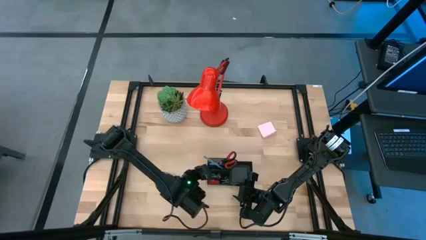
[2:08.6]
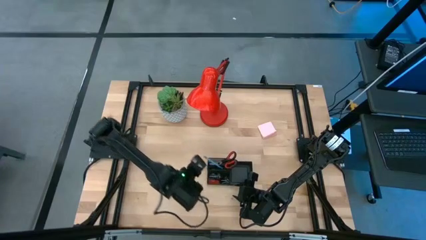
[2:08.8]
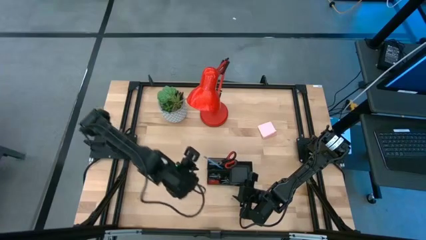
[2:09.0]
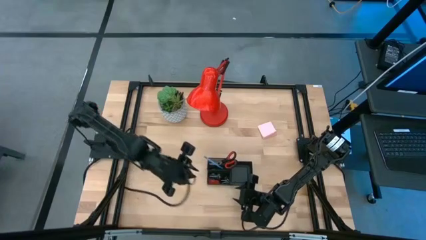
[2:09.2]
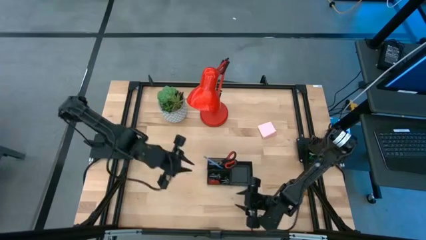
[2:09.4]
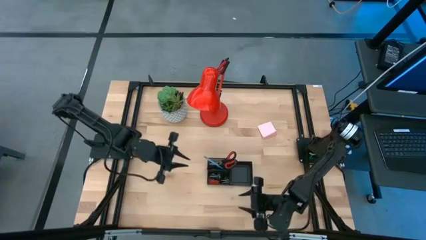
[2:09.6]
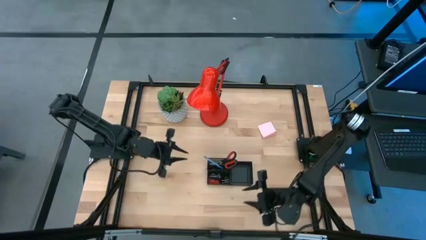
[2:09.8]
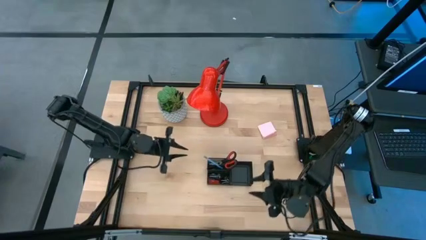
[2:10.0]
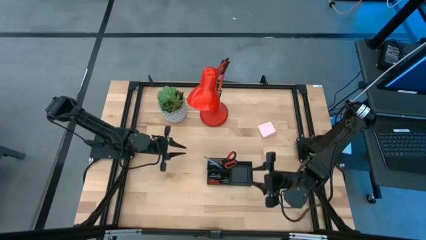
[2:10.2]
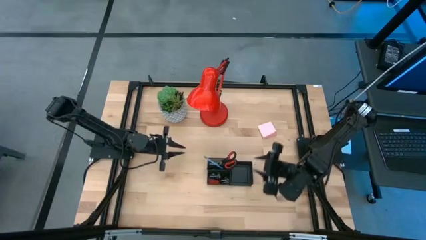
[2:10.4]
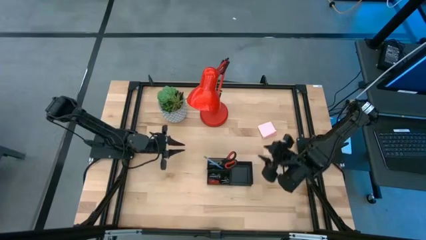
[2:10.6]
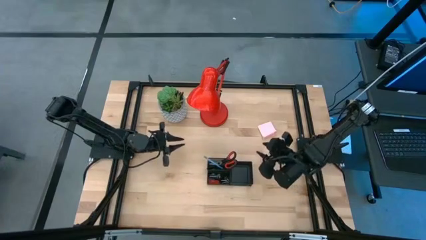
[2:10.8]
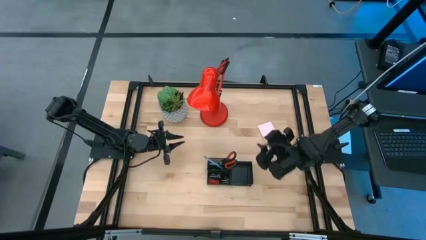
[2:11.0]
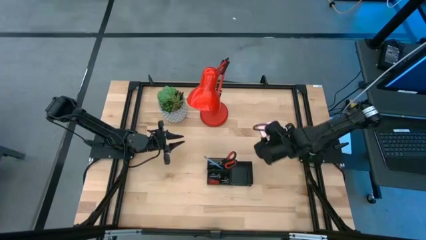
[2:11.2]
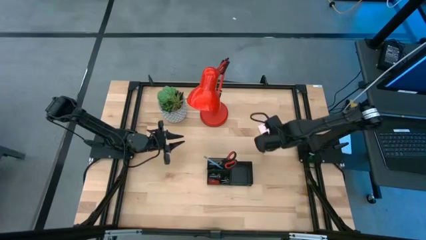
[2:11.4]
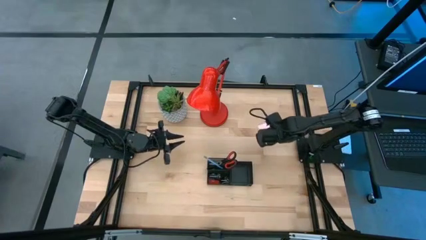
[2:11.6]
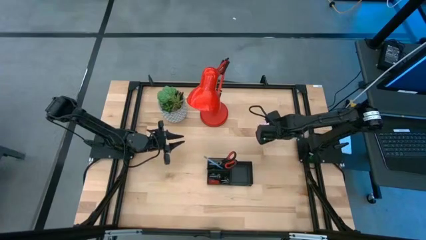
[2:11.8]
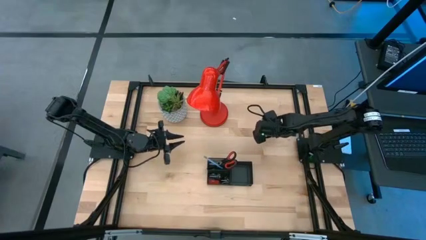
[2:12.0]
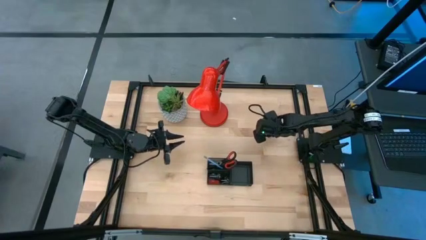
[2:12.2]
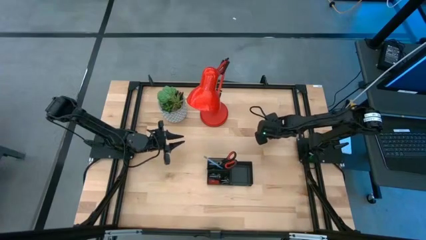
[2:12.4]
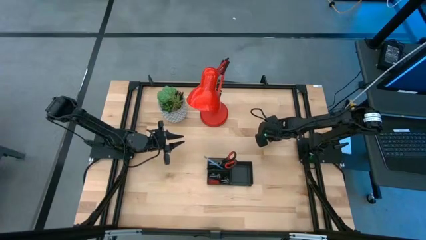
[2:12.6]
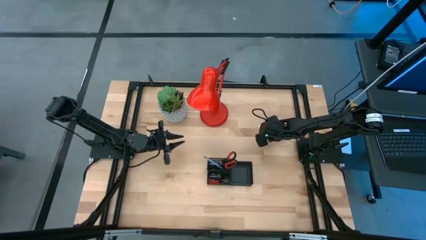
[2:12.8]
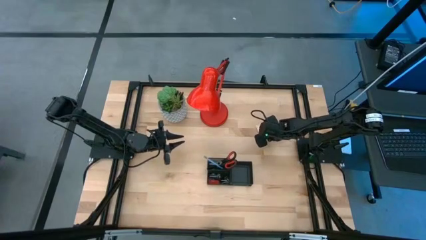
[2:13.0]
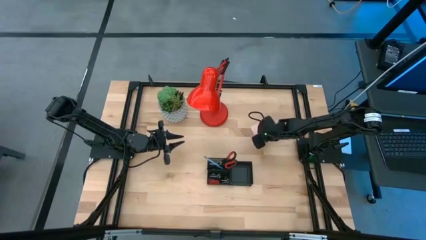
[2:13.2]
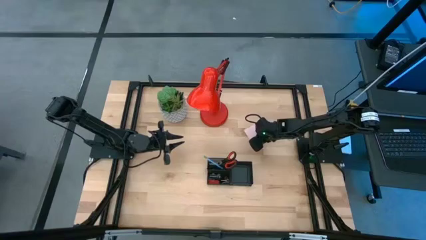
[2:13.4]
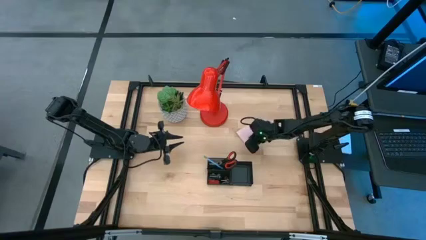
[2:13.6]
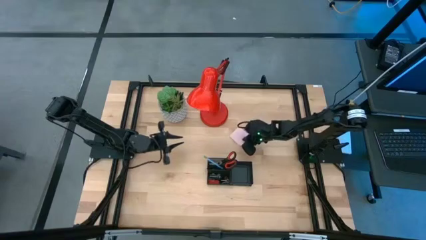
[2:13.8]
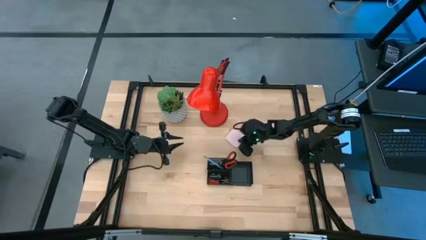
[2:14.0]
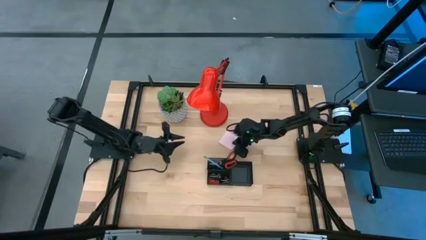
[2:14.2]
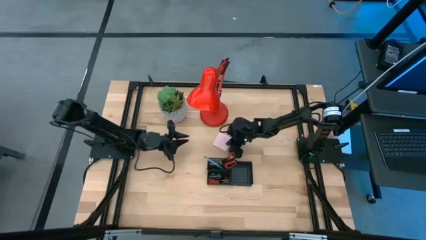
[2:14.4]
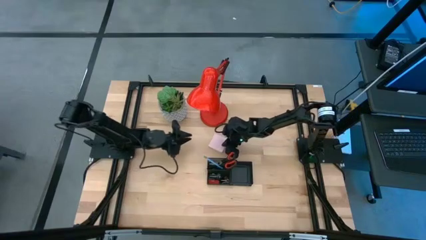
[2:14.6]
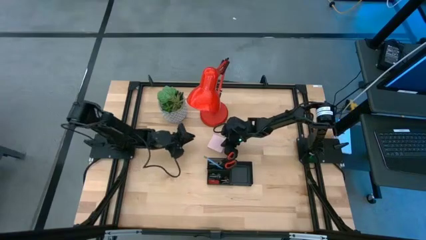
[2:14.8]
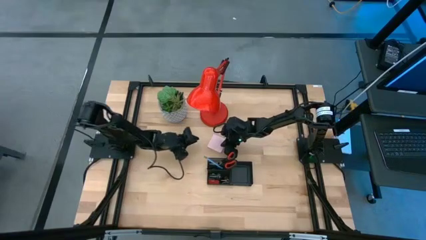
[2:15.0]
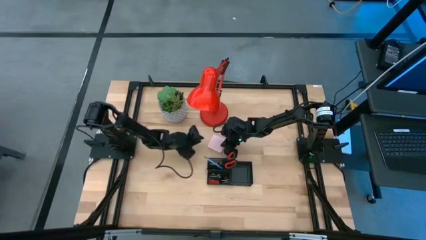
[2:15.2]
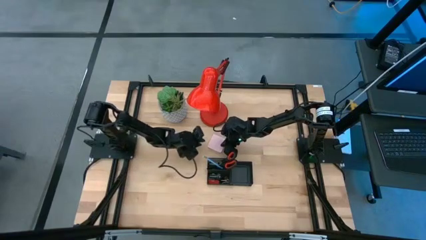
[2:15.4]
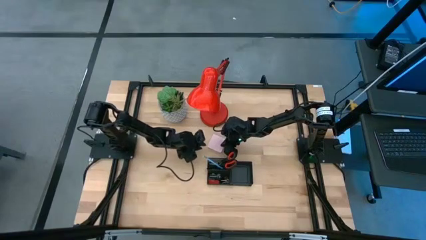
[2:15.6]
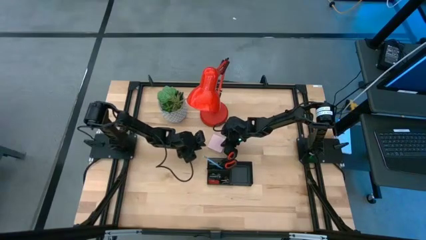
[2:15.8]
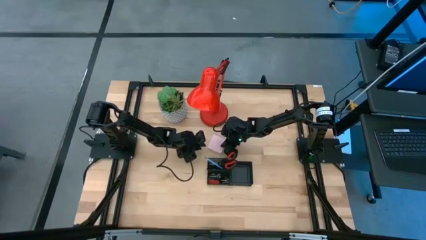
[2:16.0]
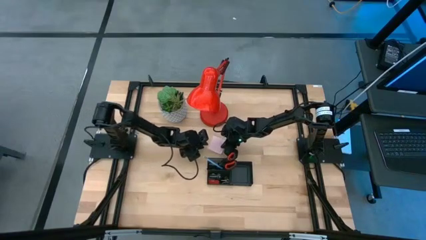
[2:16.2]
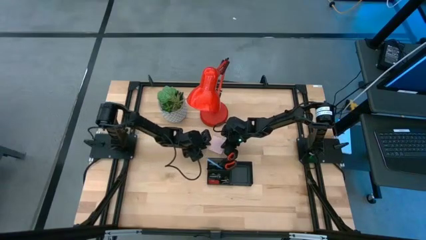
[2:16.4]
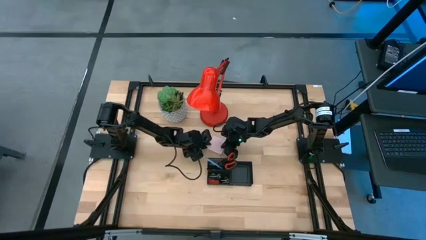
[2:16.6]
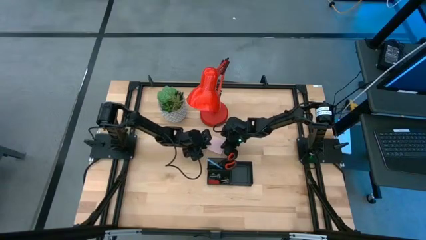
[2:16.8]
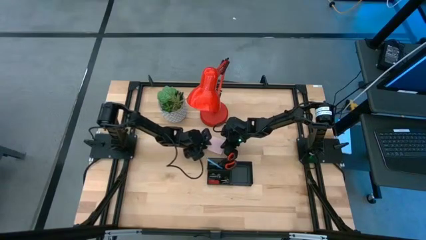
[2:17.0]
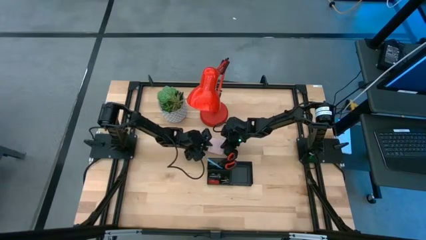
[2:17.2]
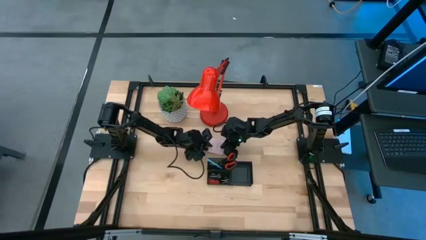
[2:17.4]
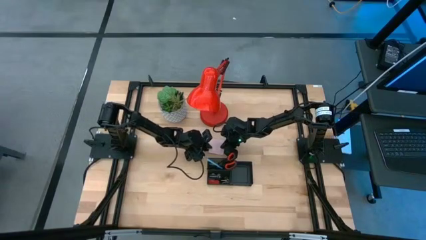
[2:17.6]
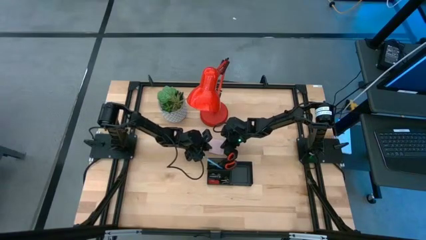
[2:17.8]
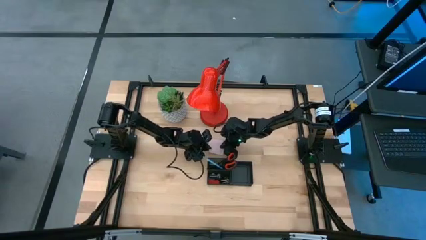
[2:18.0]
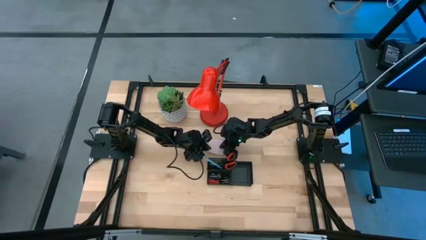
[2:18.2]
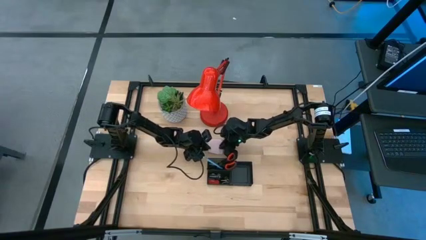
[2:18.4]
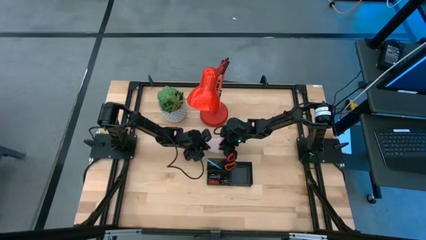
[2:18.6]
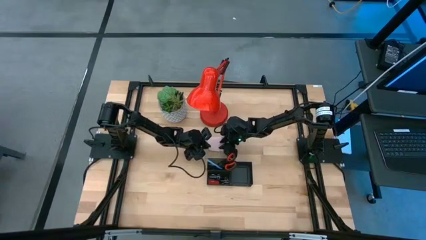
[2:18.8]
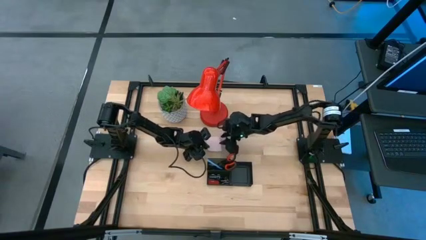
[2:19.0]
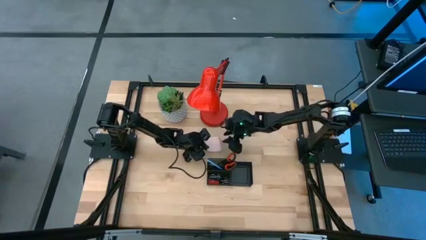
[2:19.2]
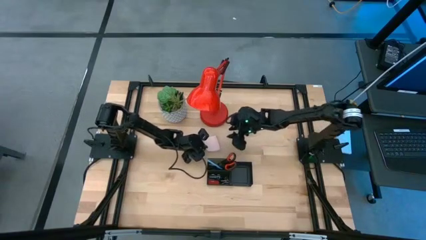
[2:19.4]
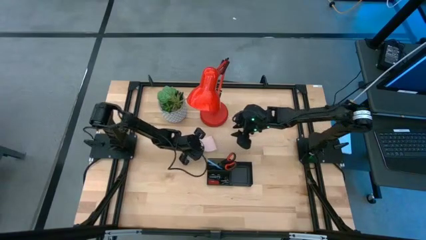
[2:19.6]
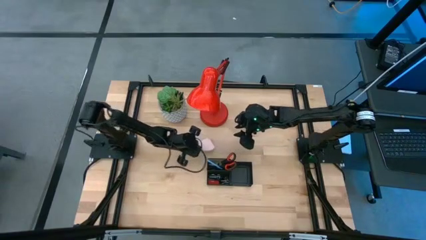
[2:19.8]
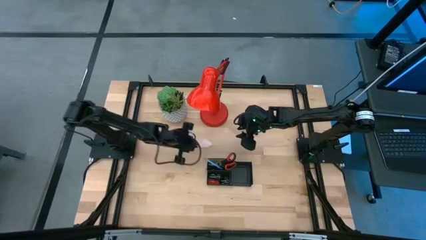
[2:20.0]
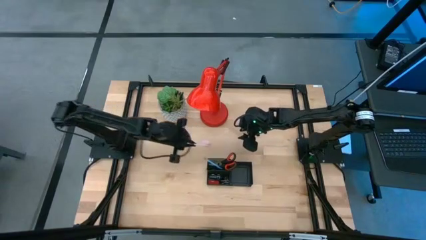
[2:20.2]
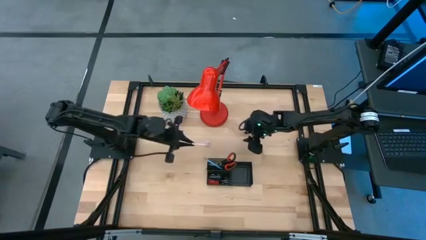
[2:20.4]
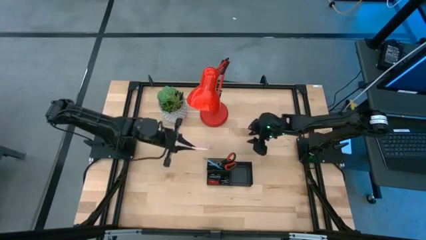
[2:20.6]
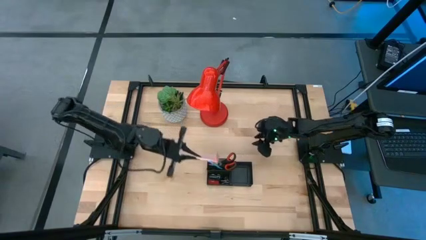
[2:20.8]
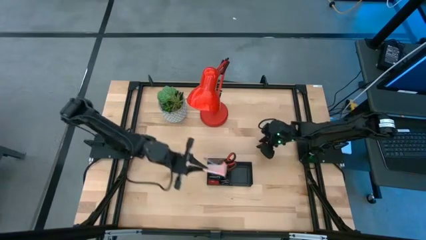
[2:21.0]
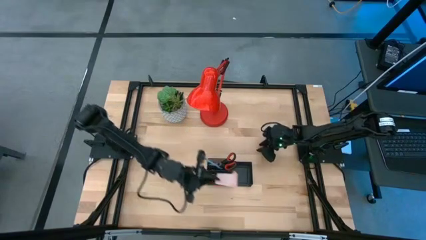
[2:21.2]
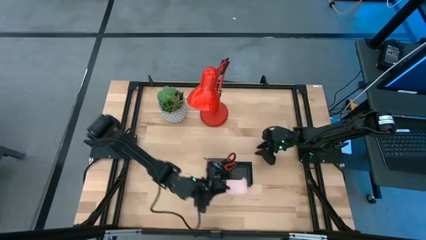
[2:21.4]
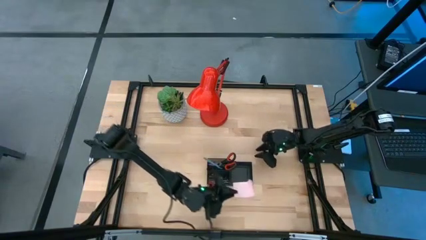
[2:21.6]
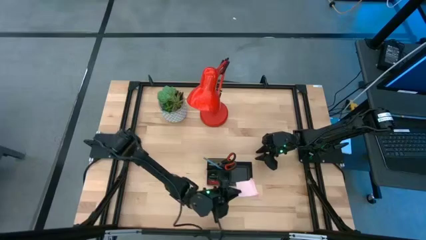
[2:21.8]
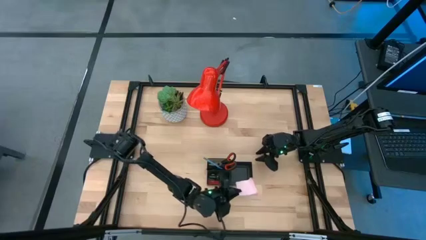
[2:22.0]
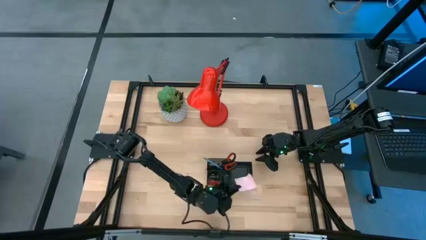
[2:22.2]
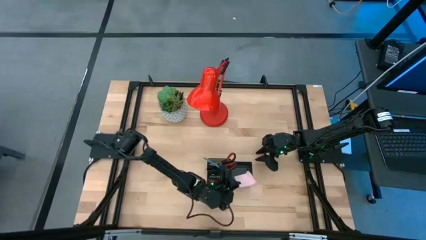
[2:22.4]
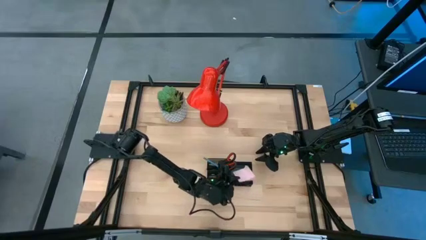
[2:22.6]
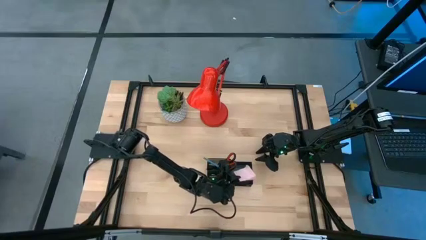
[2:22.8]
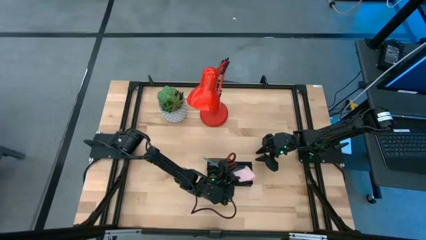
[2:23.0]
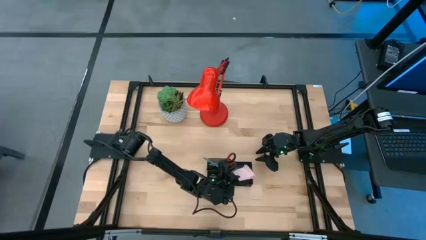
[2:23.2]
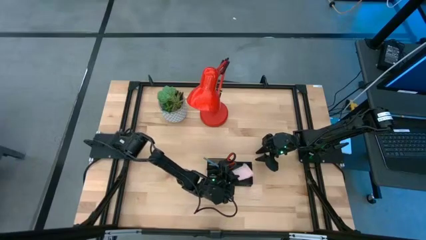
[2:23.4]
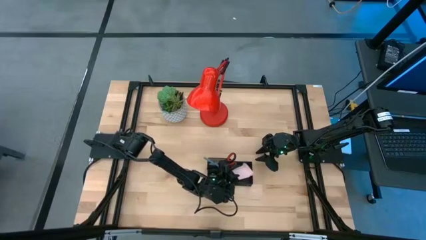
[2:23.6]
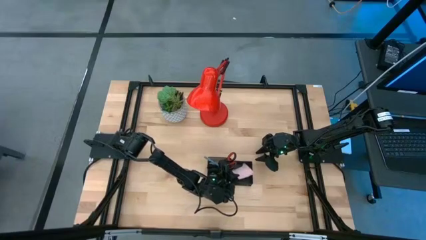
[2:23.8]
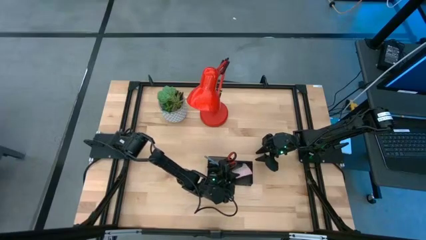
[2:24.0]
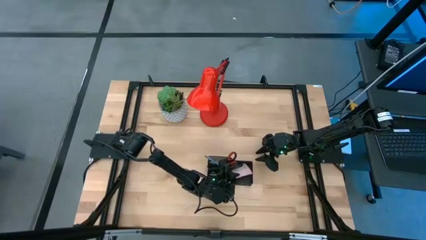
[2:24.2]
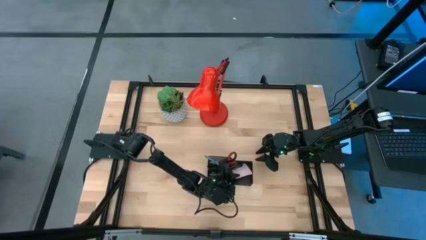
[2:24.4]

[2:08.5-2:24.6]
Task: Pick and place office supplies into organizer
Put the pink sticky note into the black desk organizer
